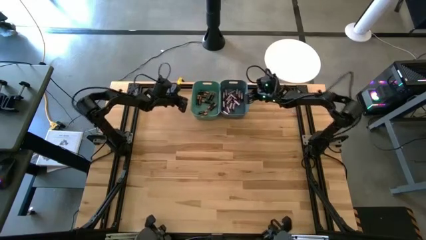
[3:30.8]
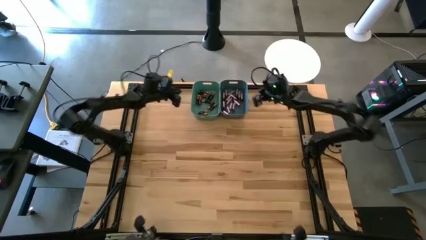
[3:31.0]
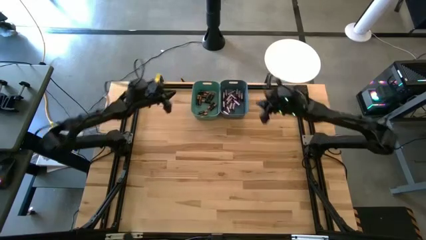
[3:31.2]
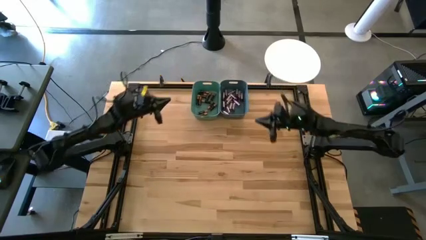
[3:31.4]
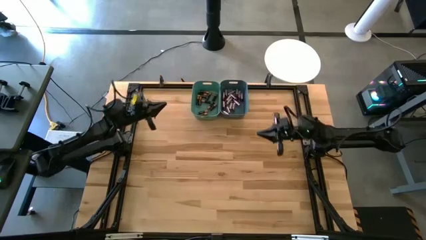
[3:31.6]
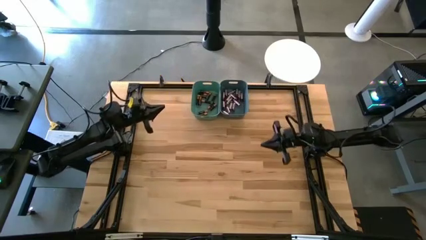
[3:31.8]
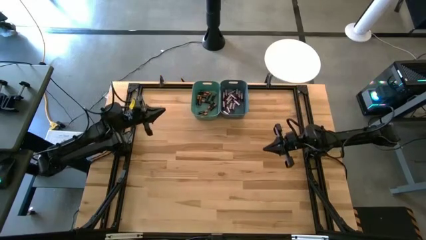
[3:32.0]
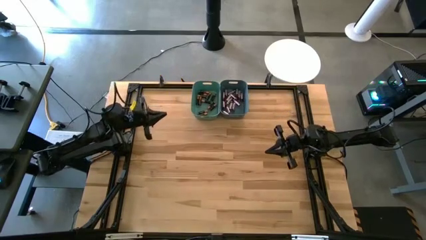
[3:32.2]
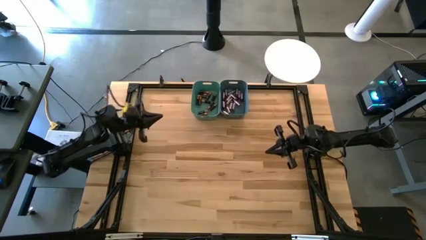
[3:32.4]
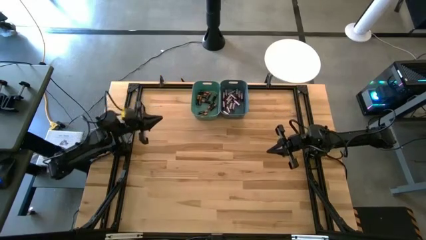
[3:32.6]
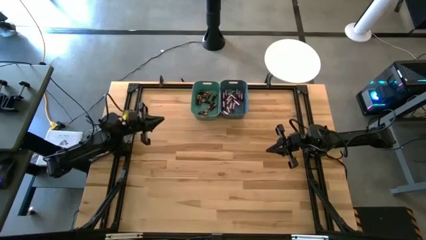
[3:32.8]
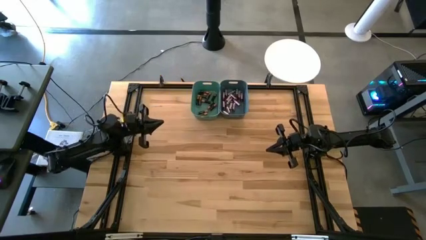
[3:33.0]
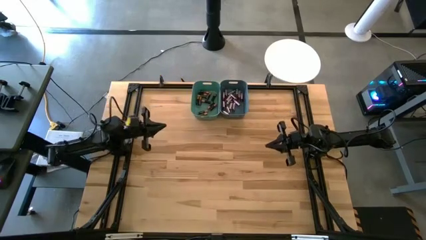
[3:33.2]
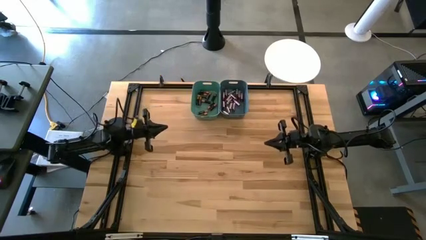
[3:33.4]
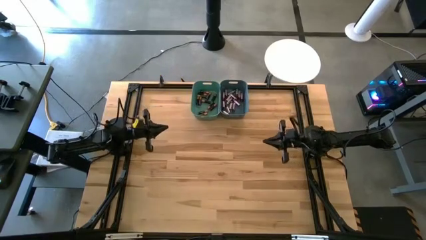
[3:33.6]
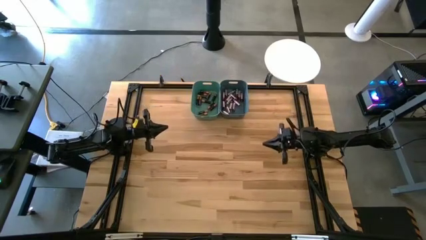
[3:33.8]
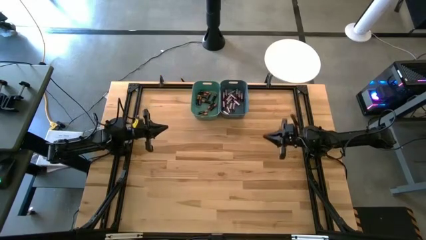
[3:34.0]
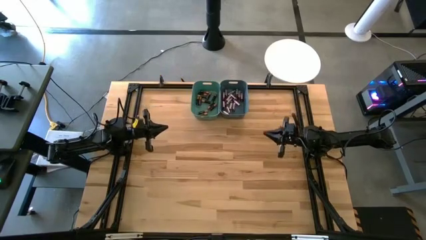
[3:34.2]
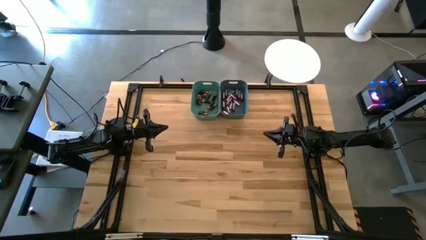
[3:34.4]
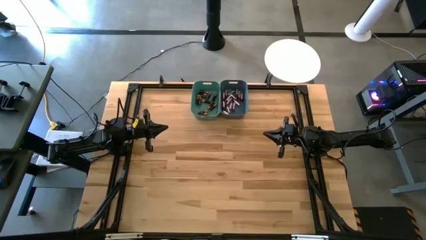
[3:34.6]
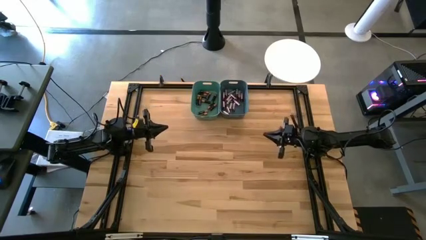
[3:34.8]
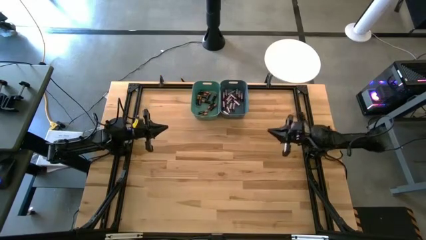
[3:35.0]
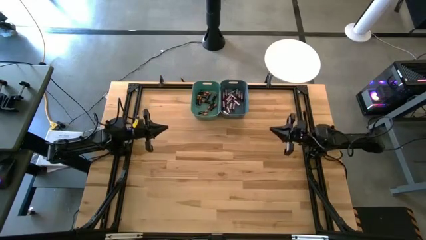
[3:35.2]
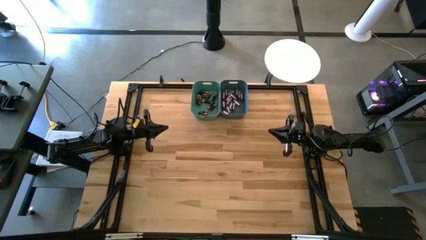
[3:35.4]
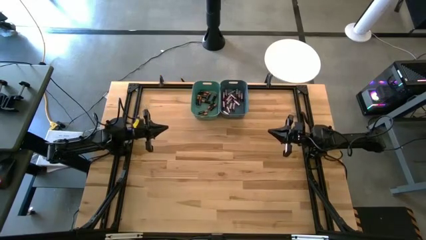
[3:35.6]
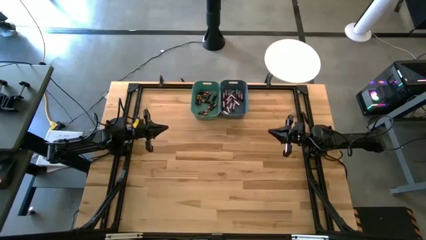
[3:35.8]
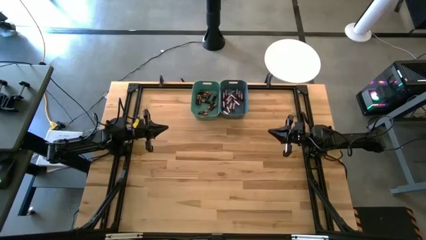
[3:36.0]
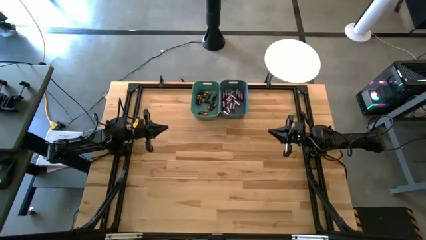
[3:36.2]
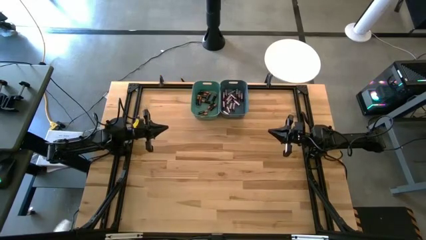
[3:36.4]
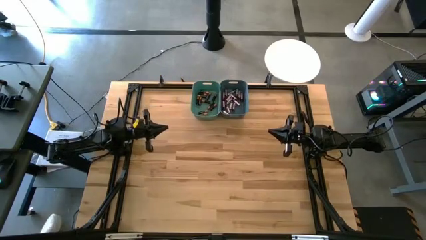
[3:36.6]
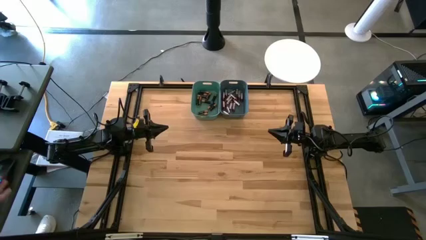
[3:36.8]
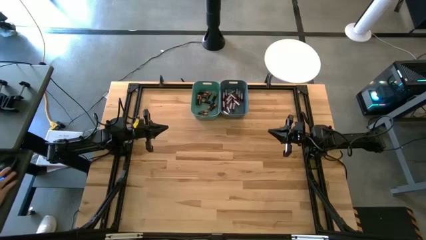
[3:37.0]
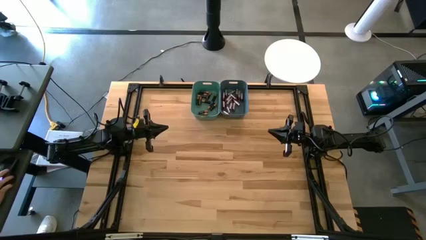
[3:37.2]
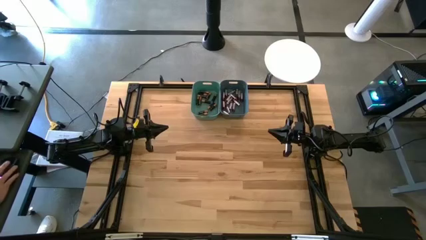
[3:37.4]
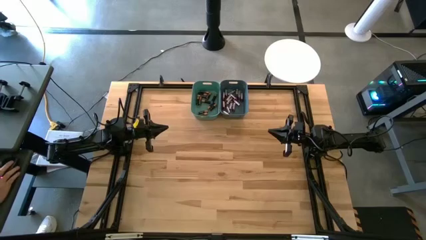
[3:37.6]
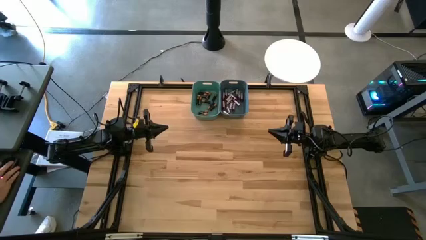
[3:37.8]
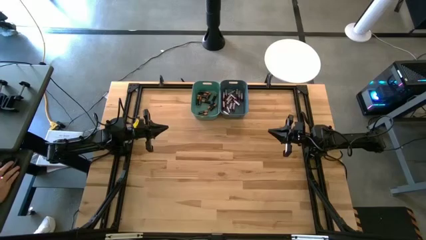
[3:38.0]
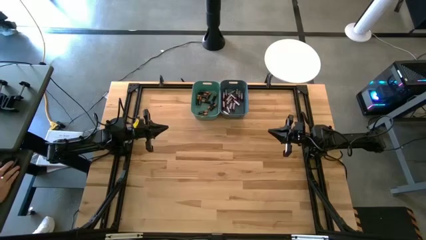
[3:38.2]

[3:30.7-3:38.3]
Task: Sort batteries
Return to Home Position

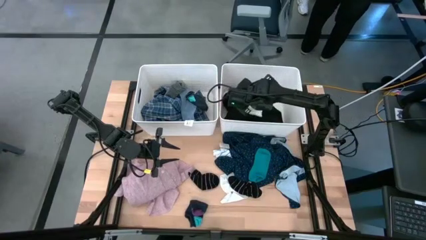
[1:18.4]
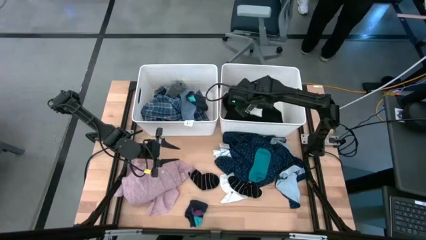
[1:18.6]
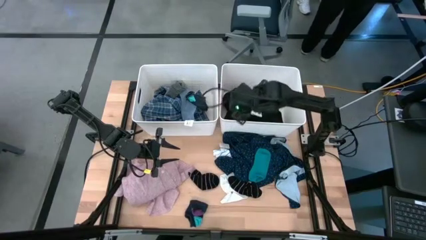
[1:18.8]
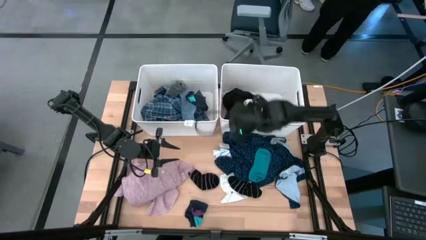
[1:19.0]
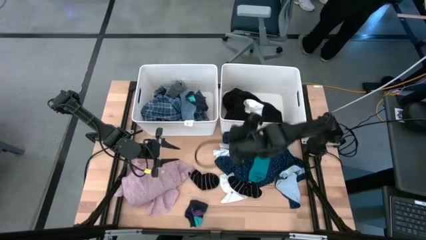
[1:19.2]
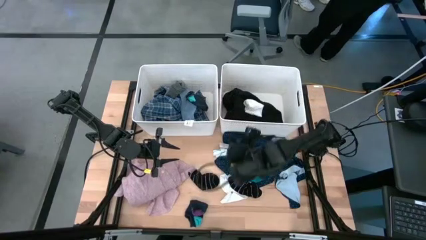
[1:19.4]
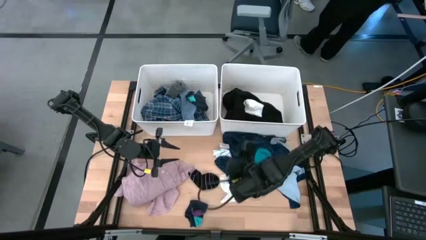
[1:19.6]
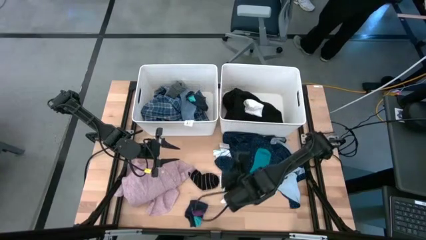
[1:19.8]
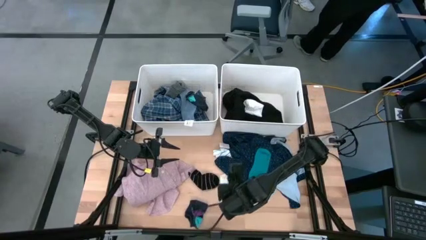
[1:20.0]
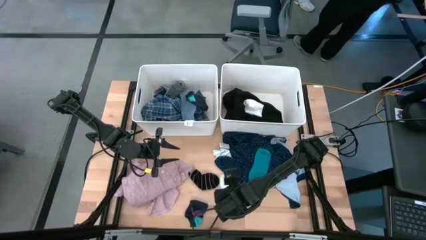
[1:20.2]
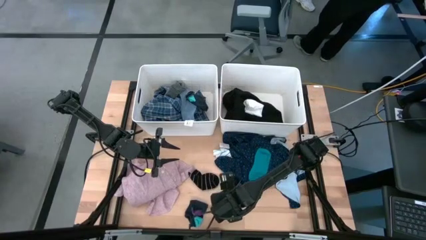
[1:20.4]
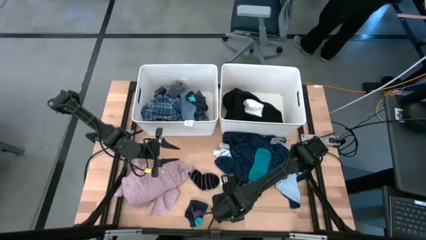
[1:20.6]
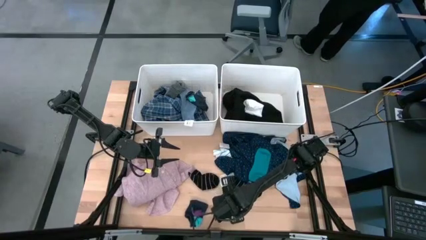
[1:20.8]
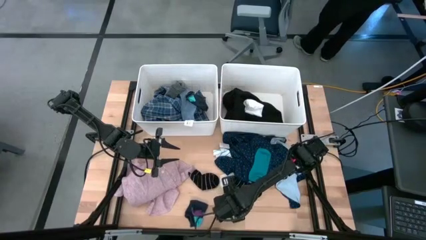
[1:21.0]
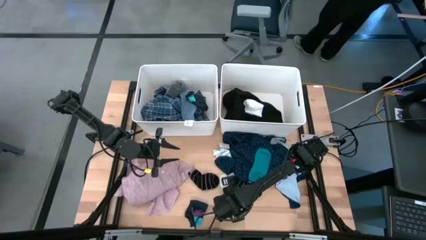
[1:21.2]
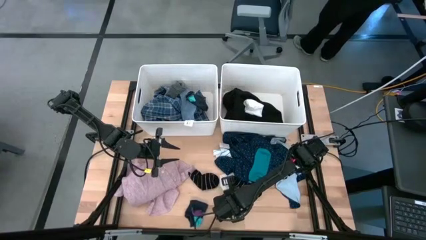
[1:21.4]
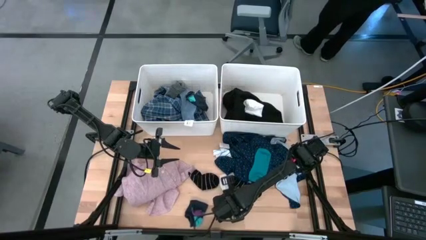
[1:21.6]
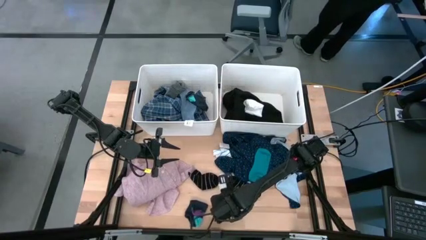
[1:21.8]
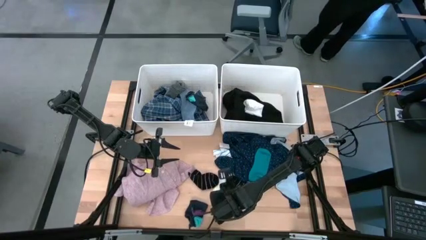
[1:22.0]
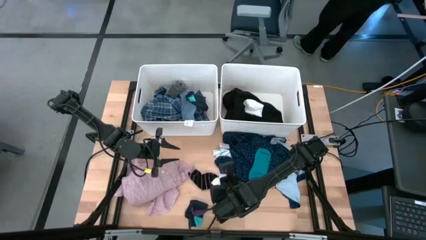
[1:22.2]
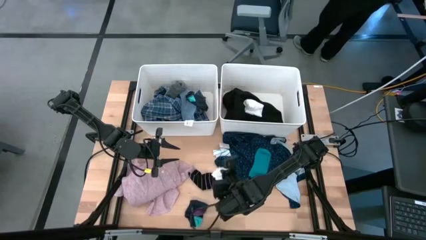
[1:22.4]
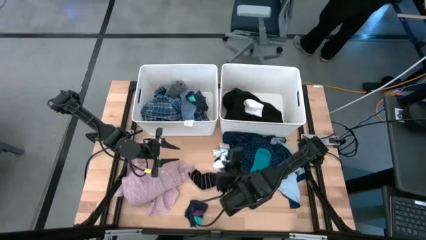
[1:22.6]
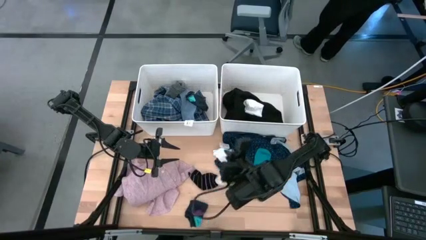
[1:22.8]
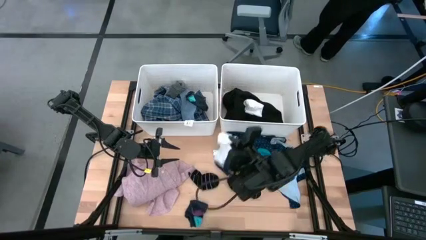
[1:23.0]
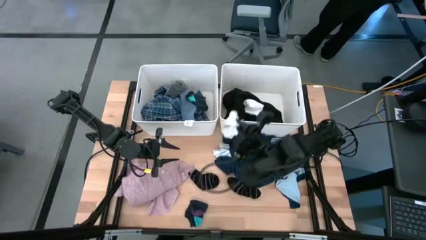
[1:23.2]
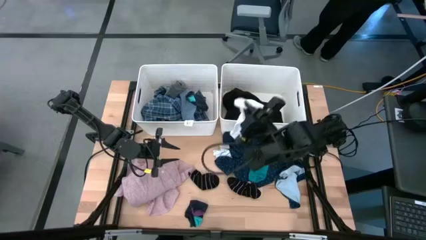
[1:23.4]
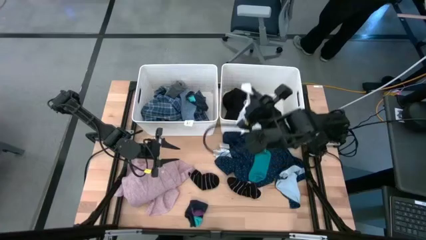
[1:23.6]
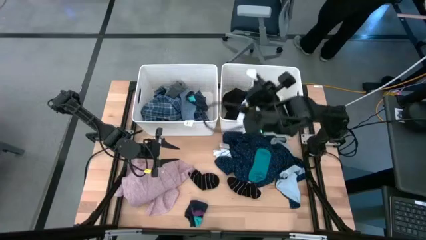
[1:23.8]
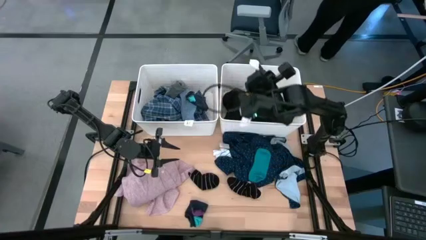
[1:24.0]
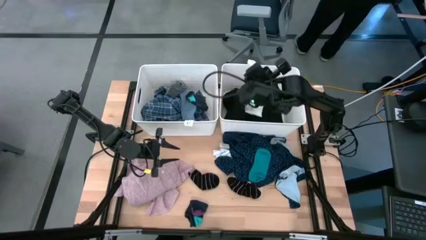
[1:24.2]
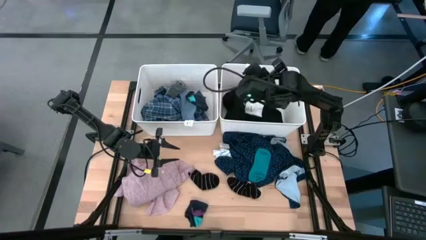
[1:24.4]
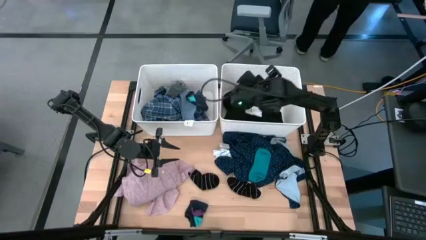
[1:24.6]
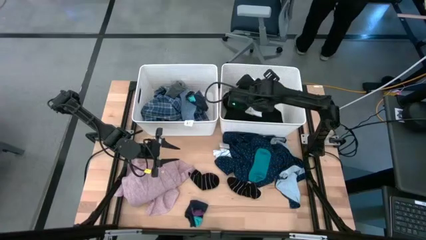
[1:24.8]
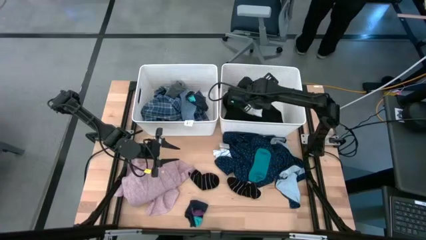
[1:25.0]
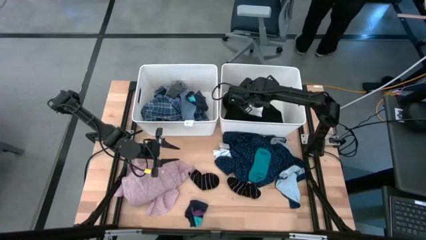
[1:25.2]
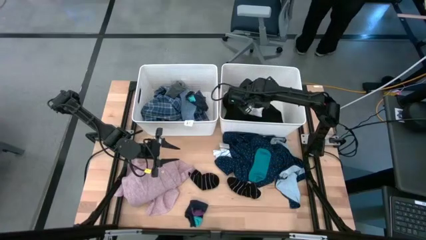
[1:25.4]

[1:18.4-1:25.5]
Task: Sort clothes
Put the white sock into the right white bin
